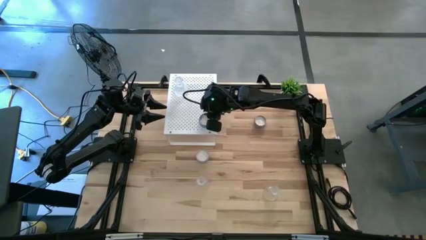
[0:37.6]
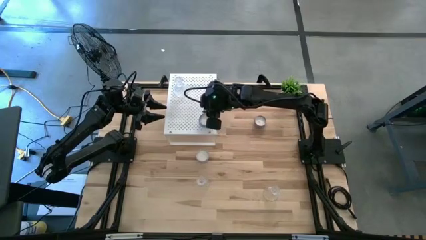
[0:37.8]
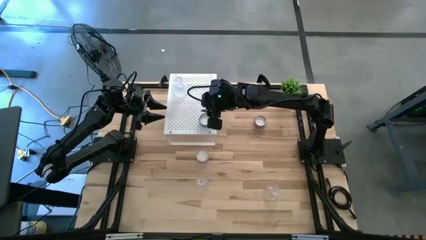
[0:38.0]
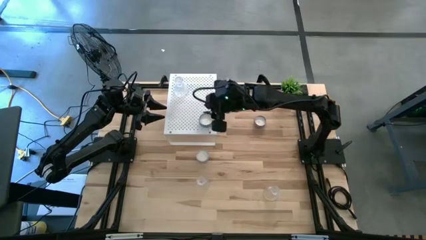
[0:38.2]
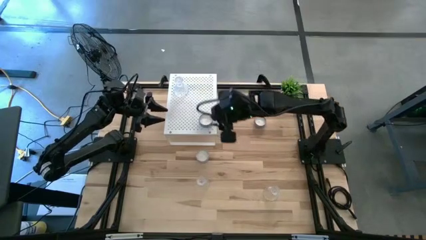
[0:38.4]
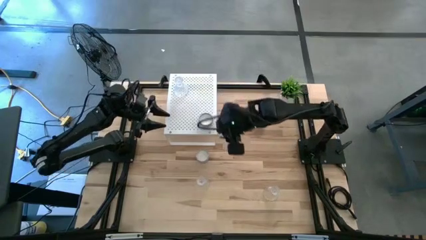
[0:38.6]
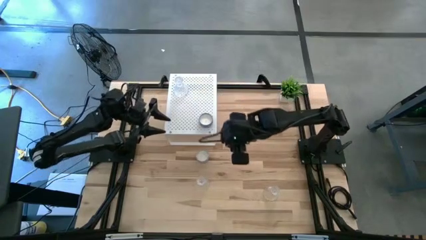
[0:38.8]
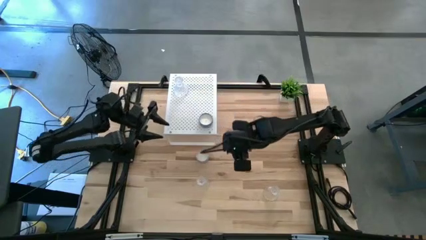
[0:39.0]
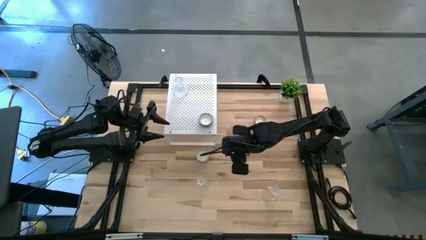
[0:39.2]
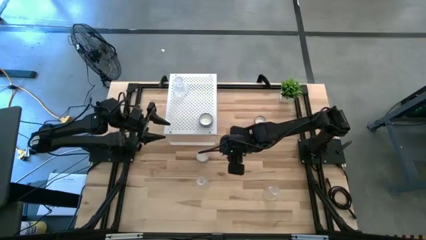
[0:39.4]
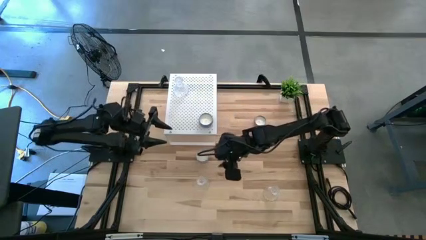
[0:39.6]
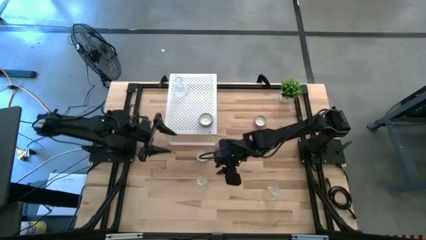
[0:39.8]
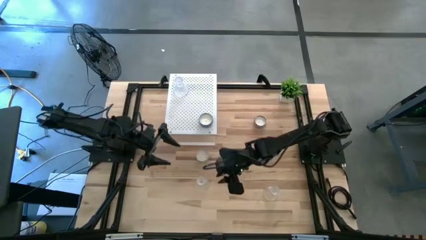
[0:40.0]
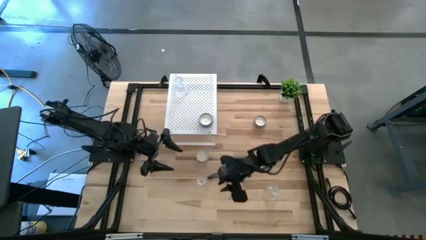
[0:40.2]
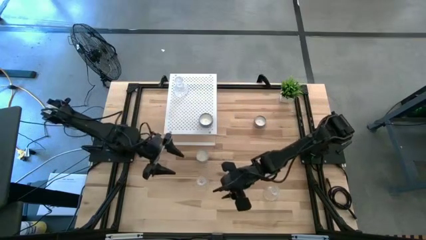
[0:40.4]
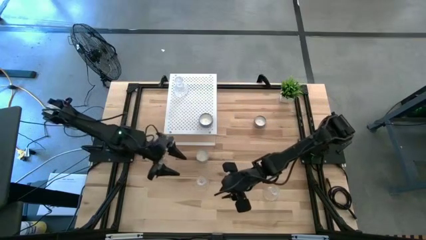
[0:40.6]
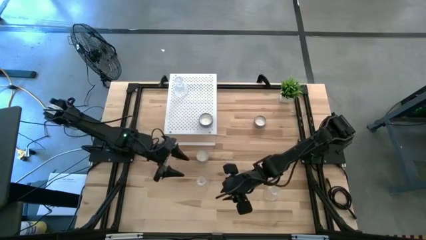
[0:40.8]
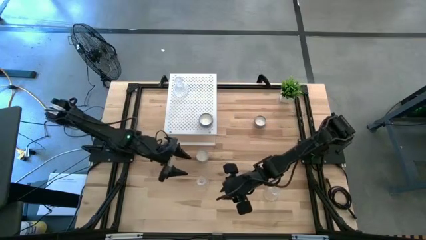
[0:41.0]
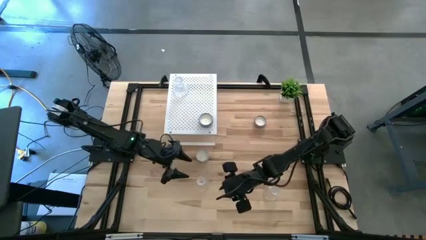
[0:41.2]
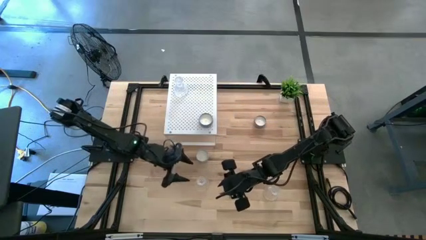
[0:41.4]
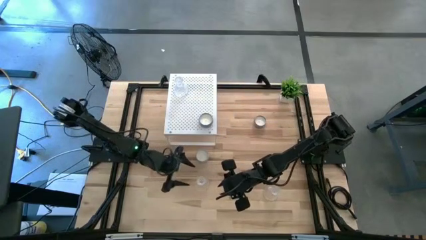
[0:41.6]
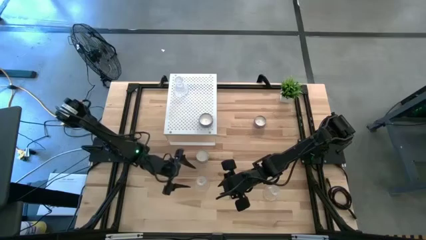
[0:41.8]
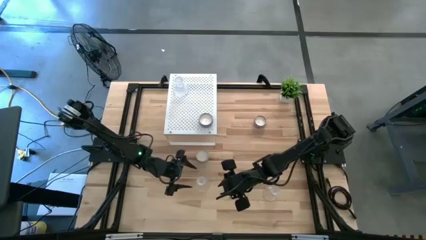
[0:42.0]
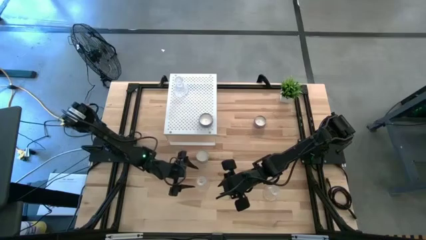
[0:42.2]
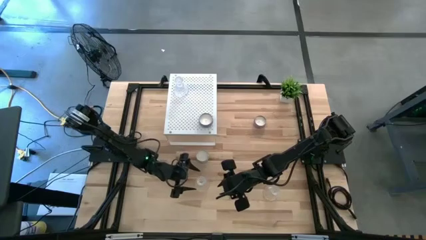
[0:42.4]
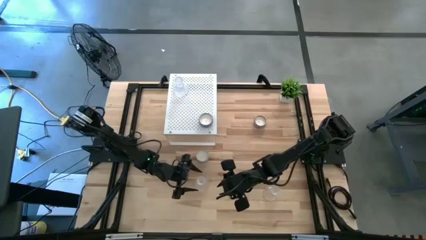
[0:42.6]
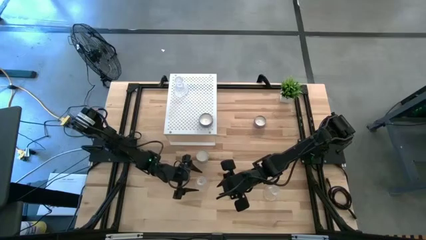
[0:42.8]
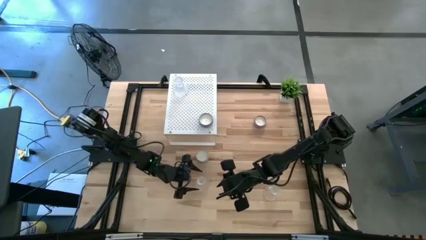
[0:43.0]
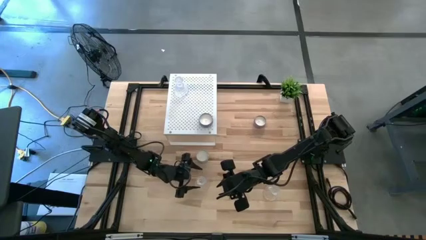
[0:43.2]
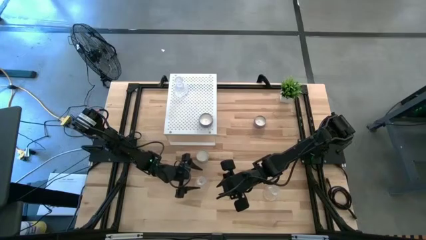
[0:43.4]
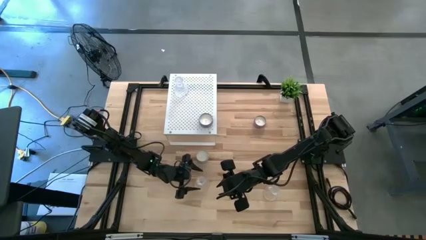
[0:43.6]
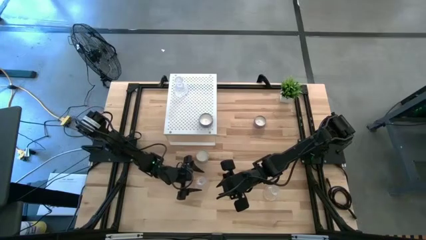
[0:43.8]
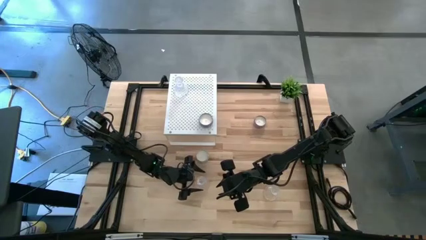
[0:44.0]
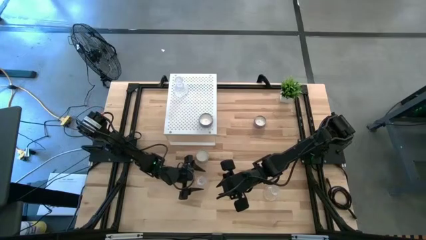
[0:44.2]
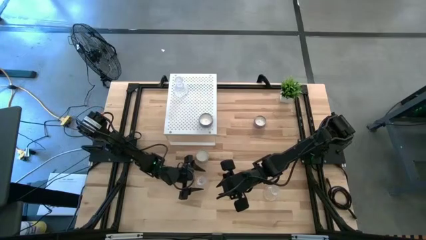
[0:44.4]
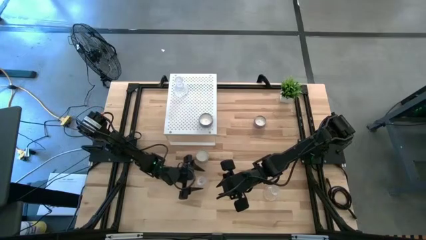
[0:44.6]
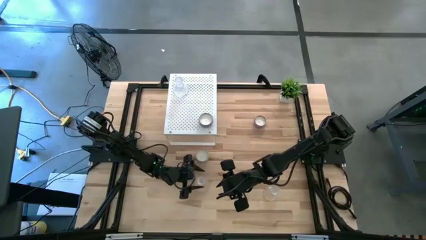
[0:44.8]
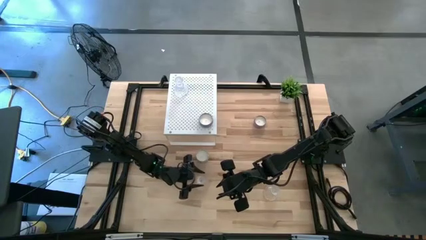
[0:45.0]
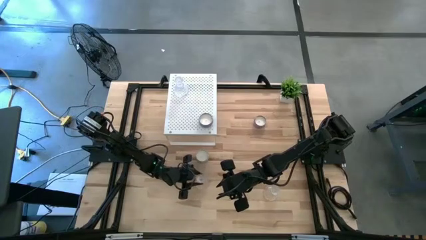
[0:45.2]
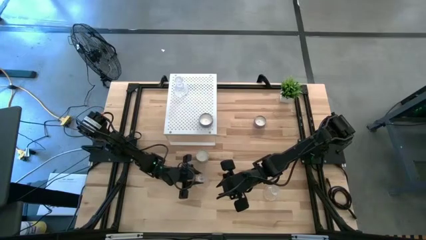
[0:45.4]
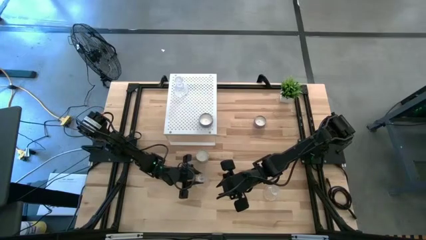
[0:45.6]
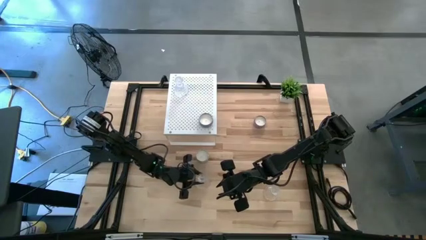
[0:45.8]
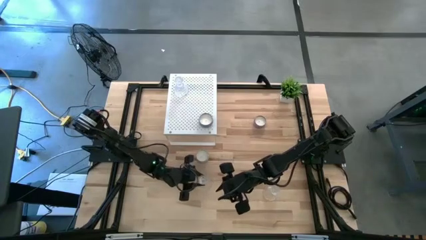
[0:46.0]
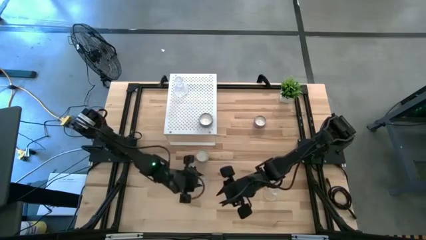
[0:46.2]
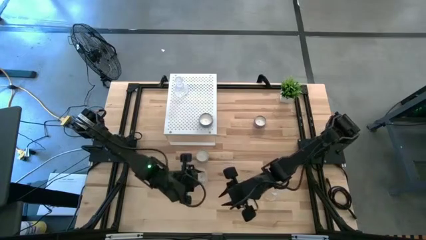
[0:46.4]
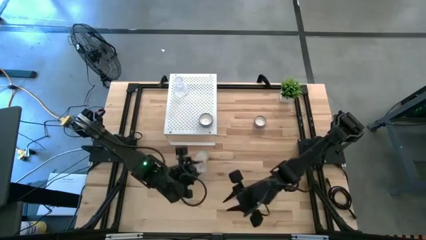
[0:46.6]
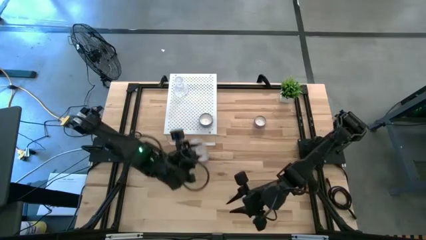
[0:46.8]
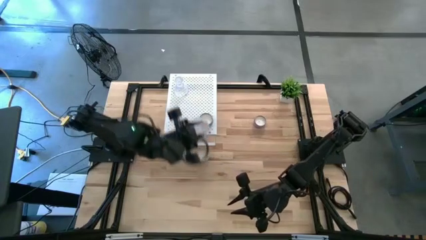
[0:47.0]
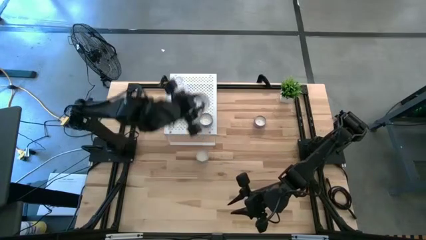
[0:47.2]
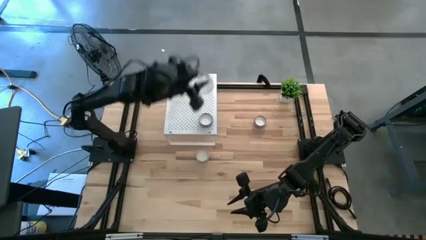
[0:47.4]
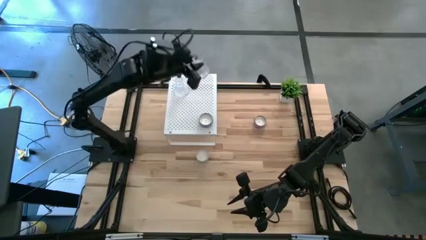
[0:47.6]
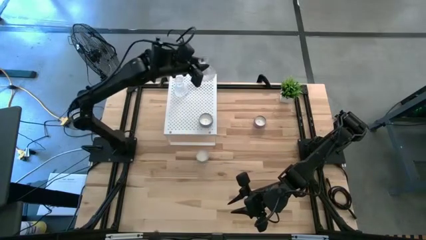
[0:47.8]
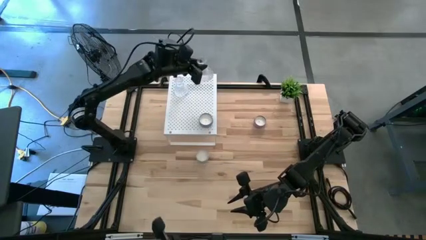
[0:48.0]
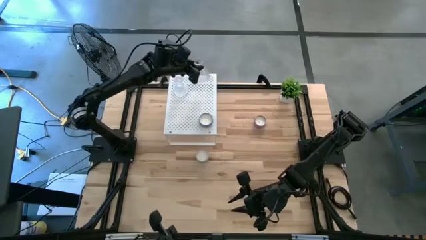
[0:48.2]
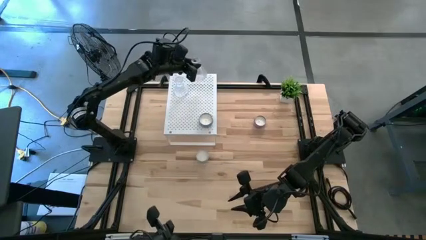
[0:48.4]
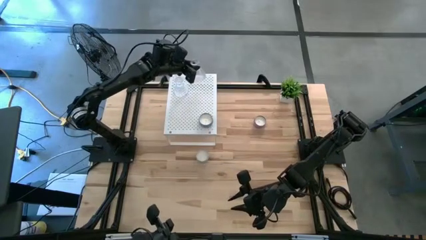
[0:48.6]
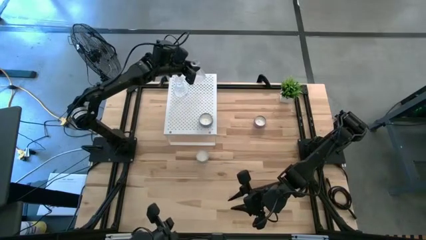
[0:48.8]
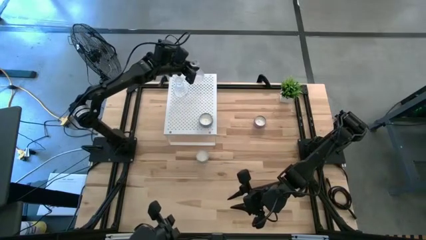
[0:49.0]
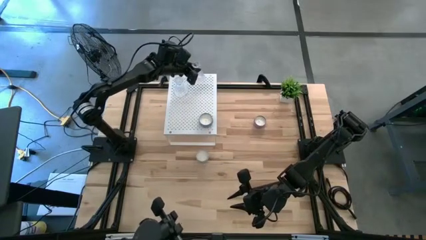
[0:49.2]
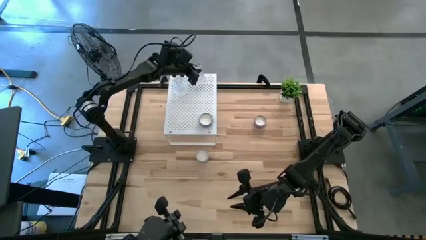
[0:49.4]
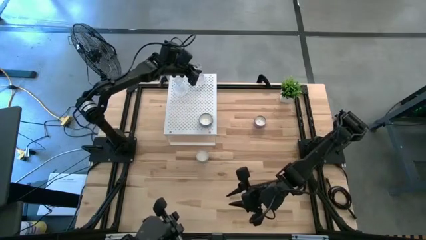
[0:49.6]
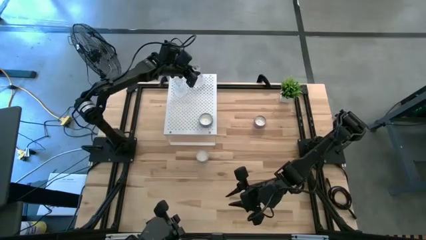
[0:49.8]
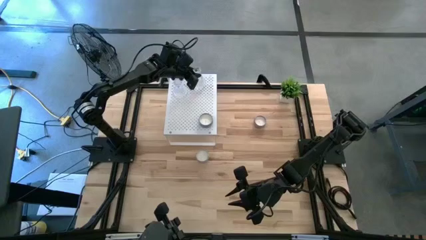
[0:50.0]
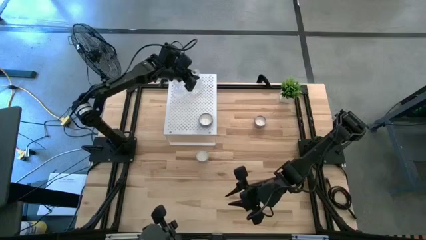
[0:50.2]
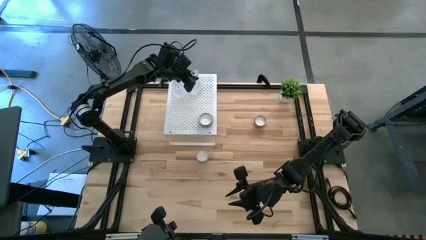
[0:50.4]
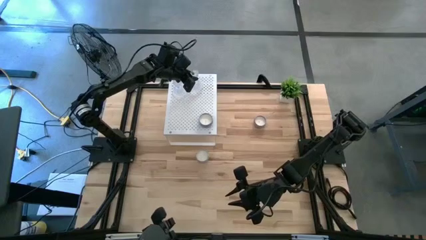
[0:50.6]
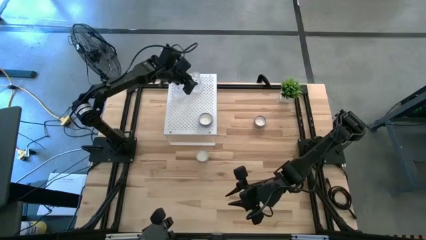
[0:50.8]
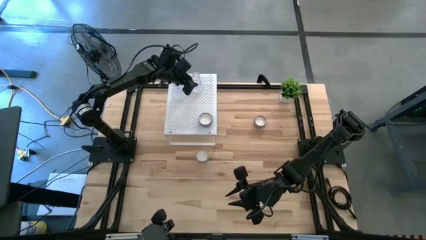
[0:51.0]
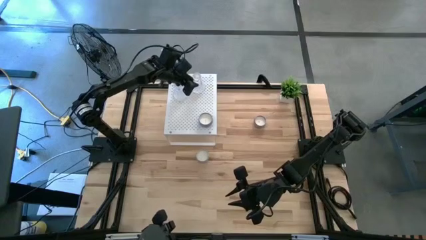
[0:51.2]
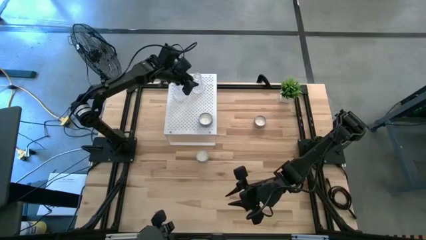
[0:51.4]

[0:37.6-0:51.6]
Task: Pick & Place candle stick holders
Put the left transparent candle holder on the shelf
